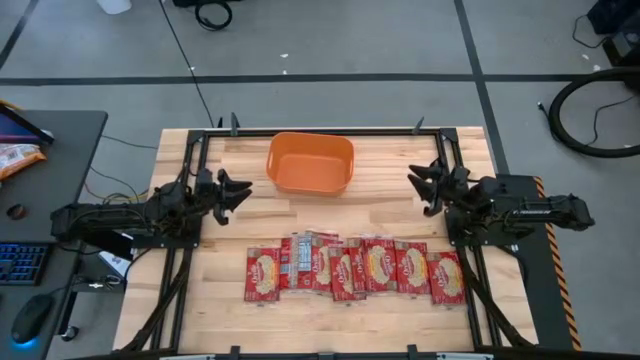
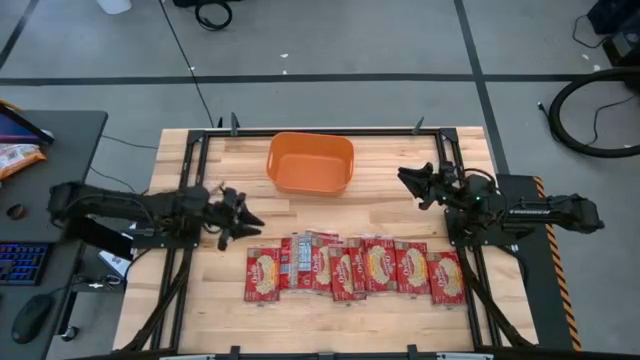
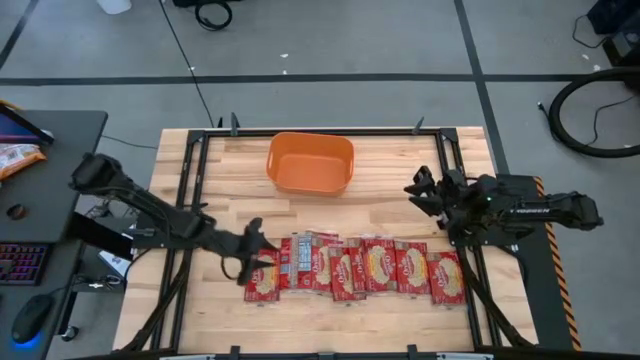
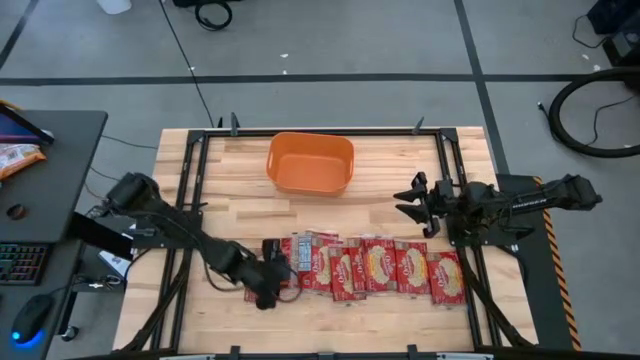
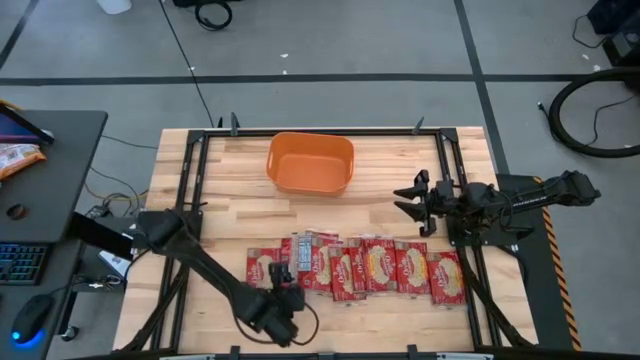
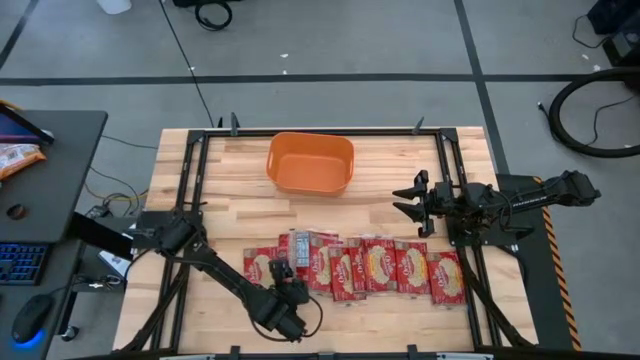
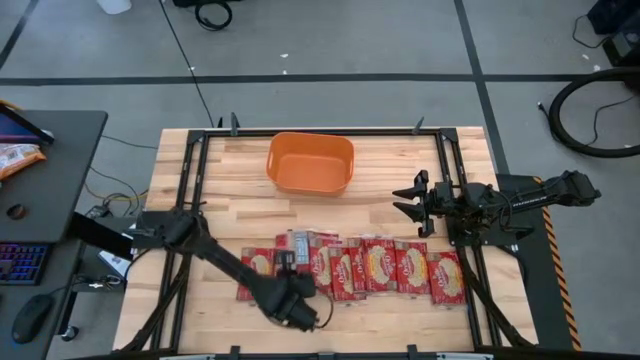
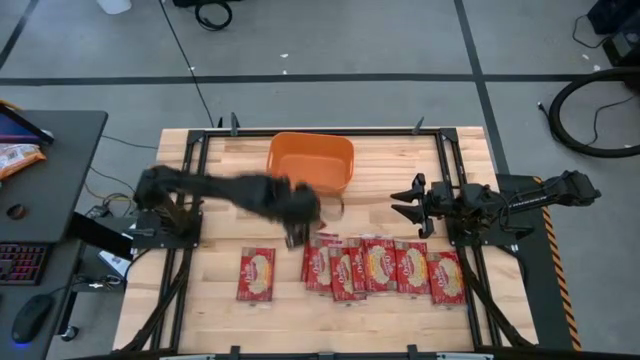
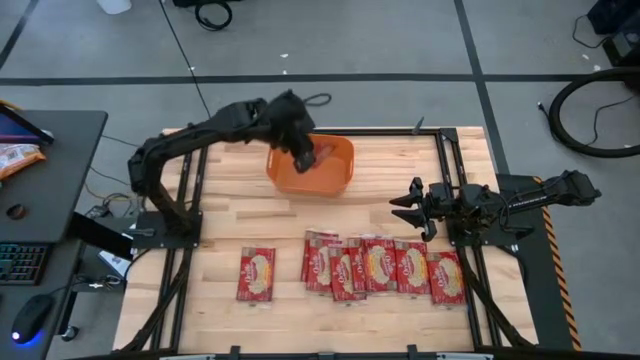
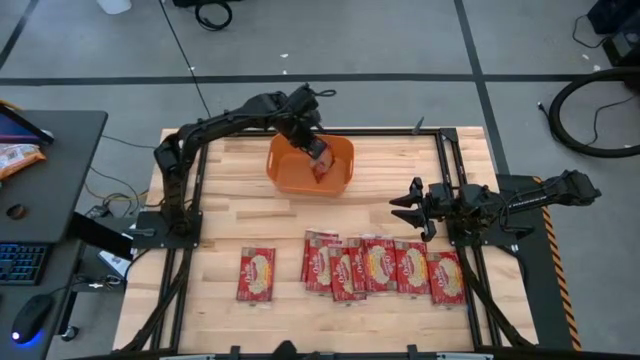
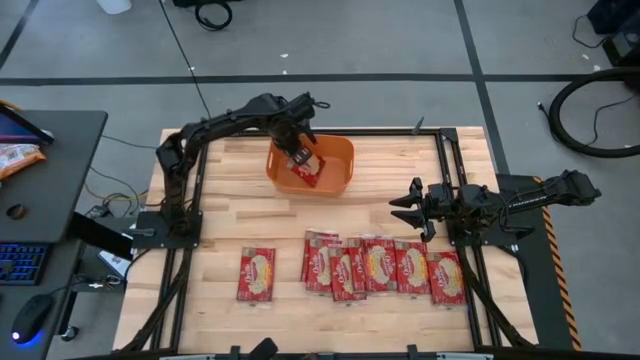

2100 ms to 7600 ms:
Task: Sort popcorn bags into baskets
Put the red popcorn bag into the orange bin

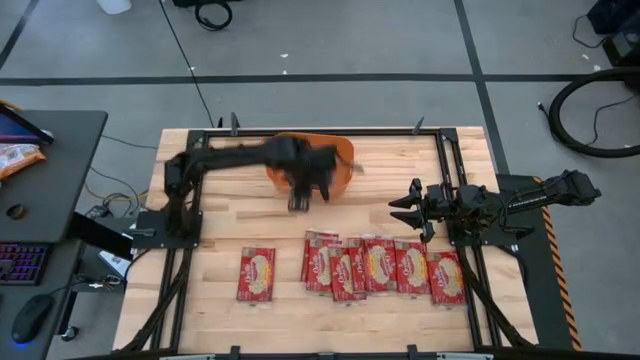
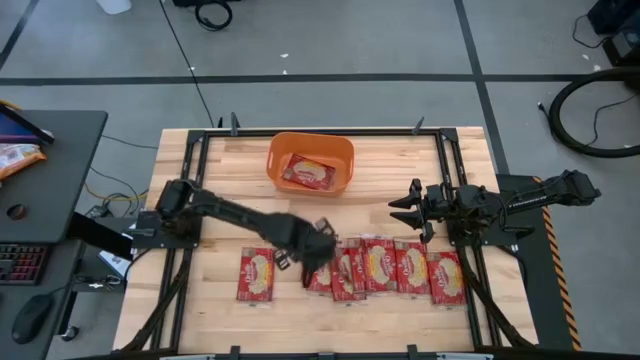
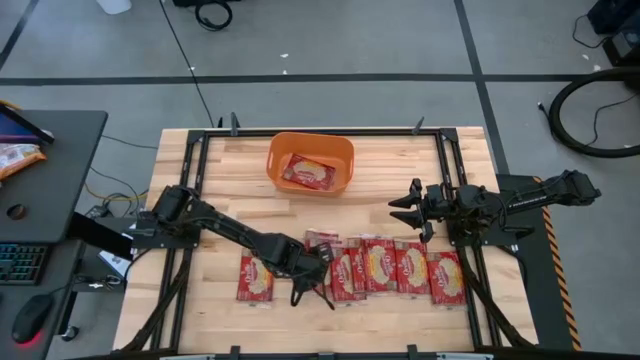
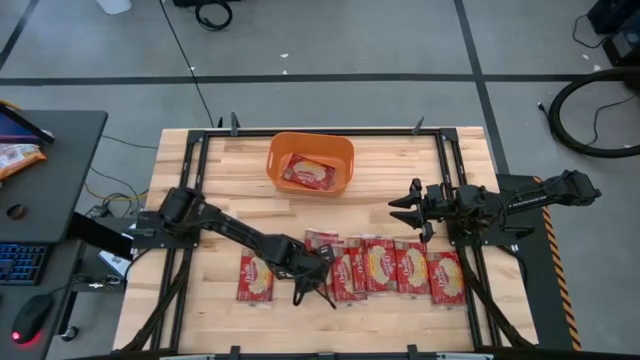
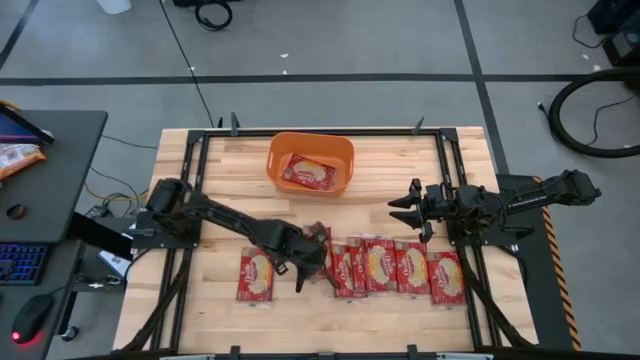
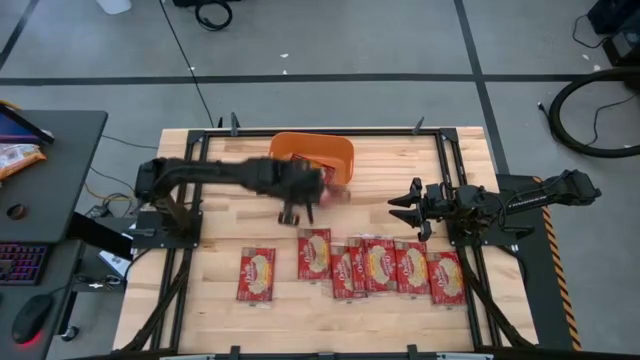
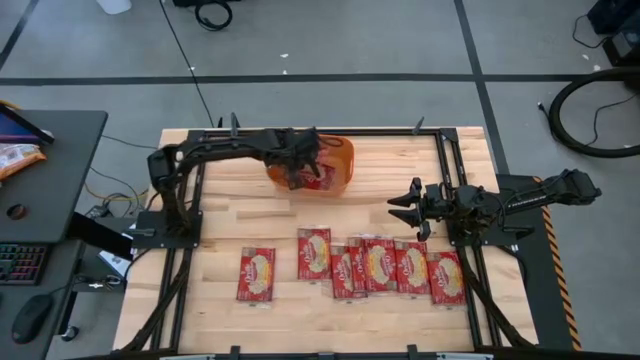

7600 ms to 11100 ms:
Put the red popcorn bag into the orange bin

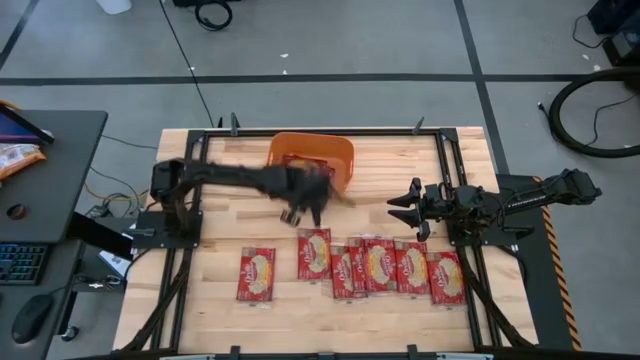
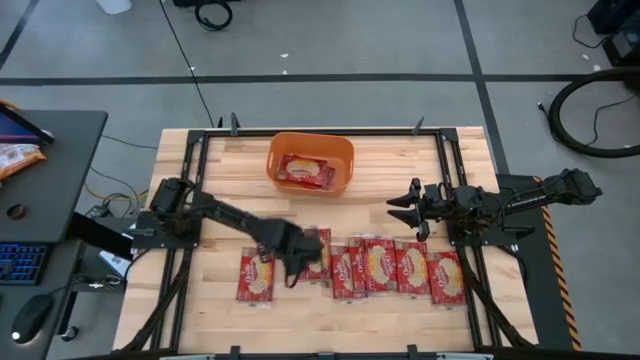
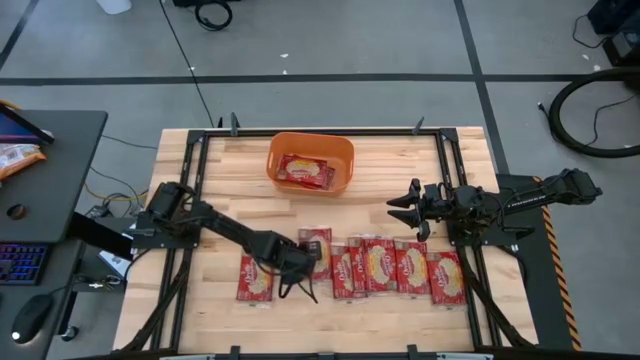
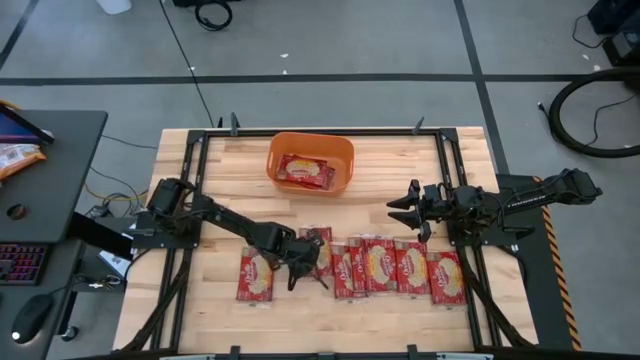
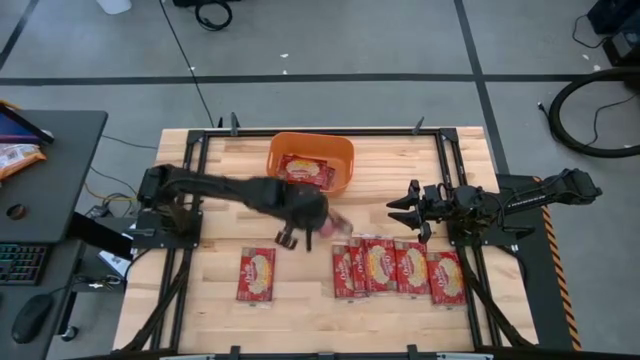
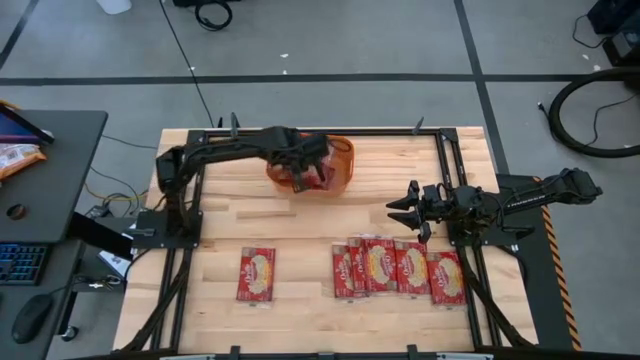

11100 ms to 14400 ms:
Put the red popcorn bag into the orange bin

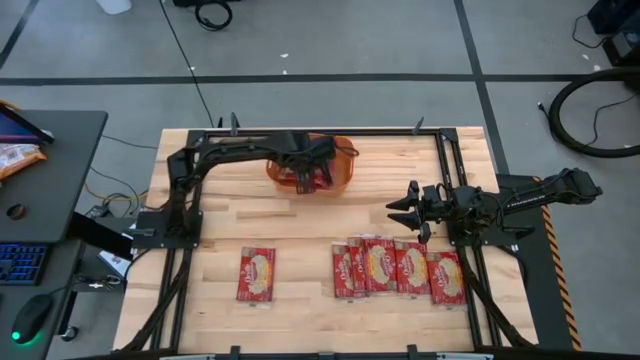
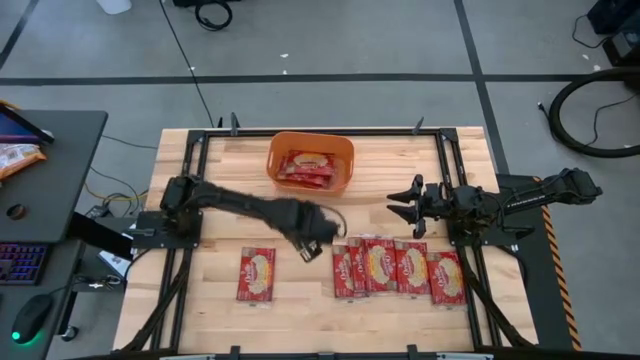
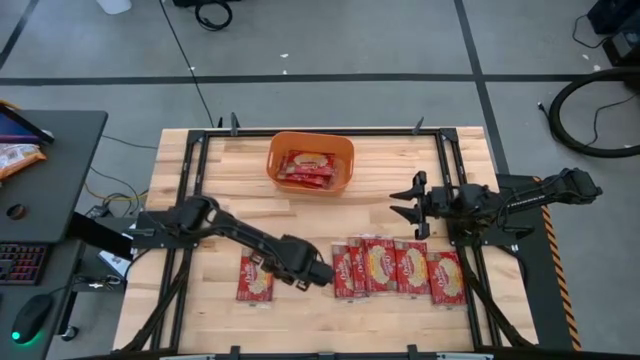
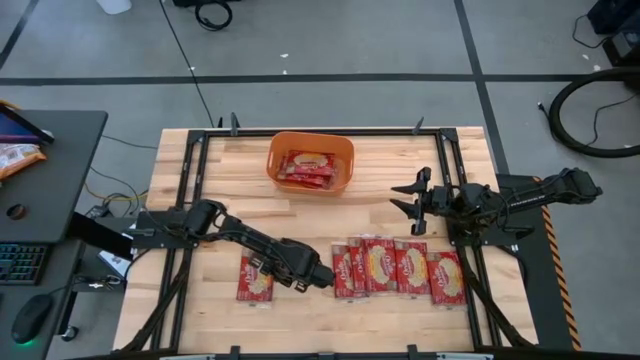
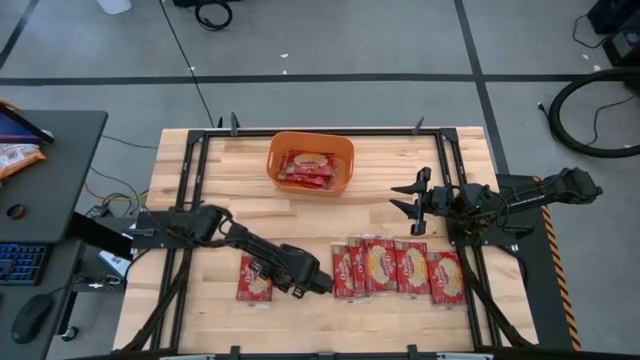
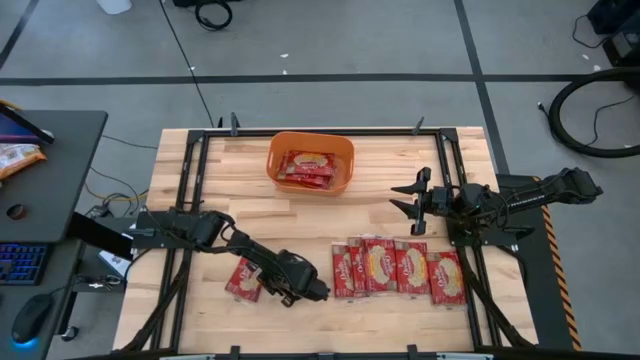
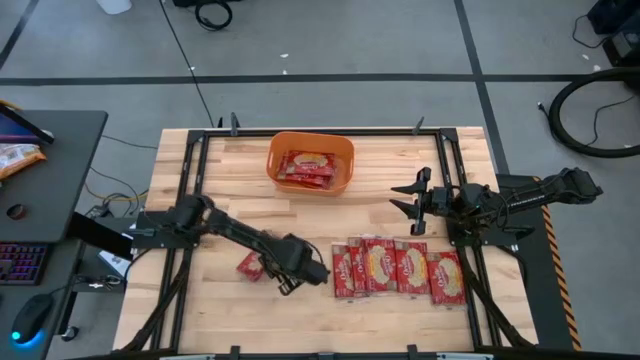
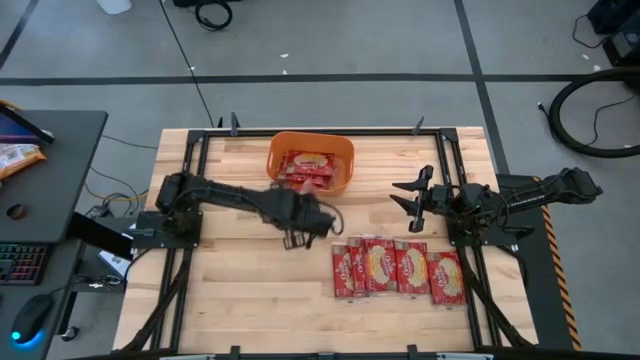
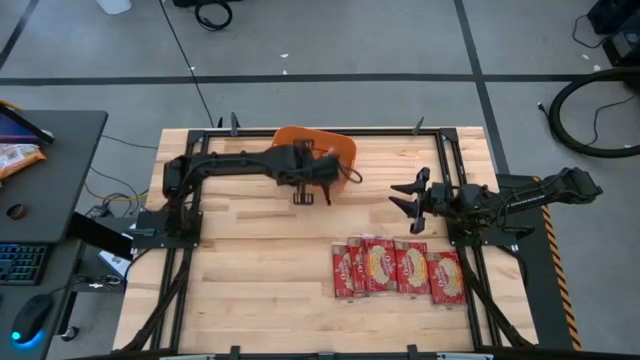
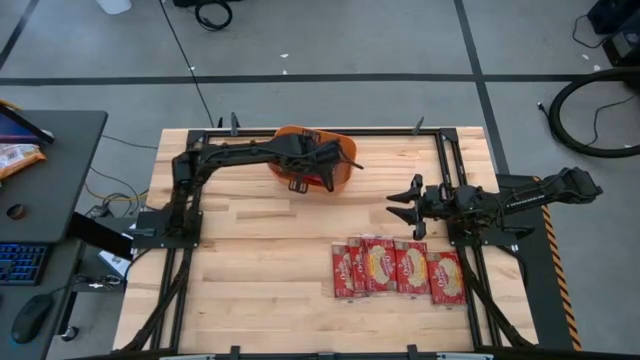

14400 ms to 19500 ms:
Put the red popcorn bag into the orange bin

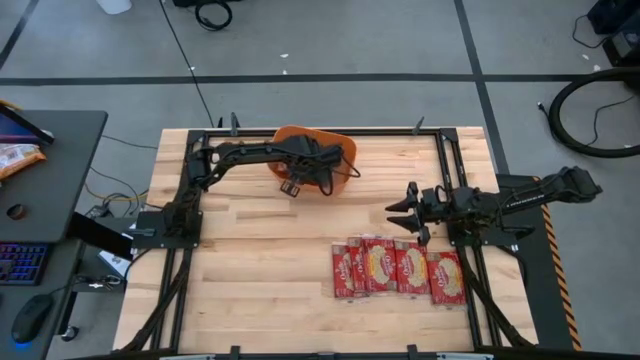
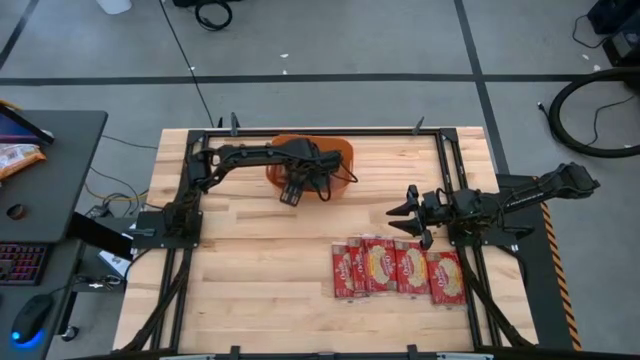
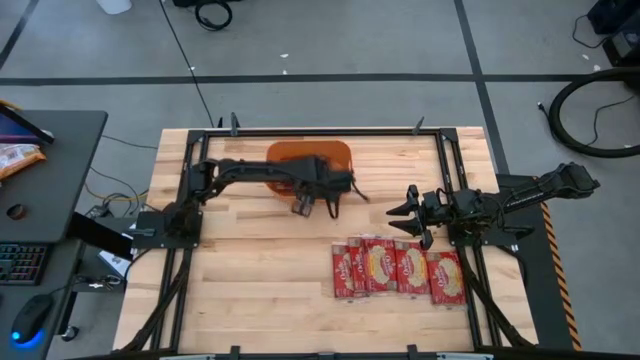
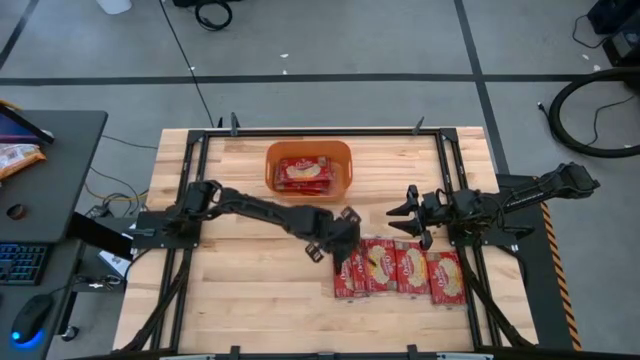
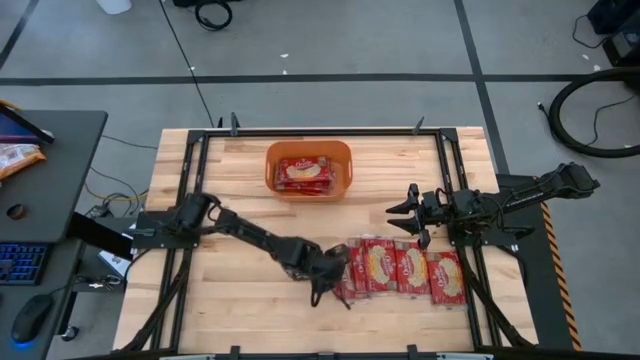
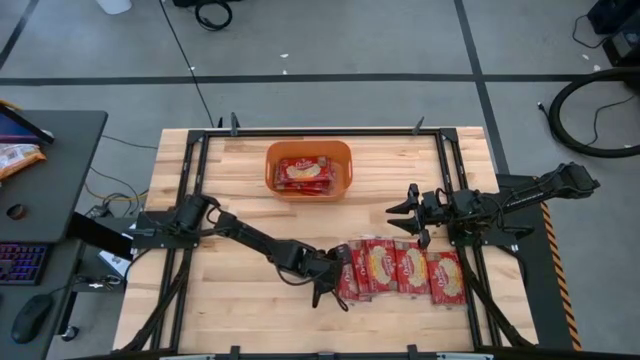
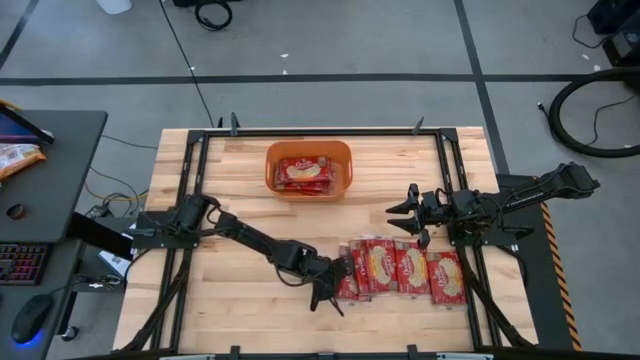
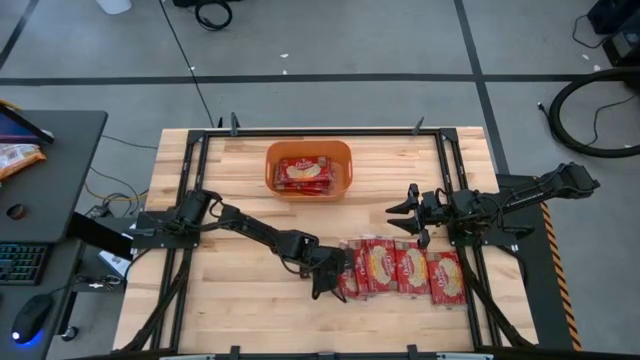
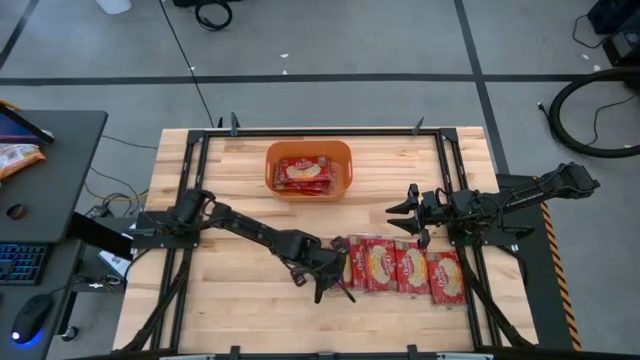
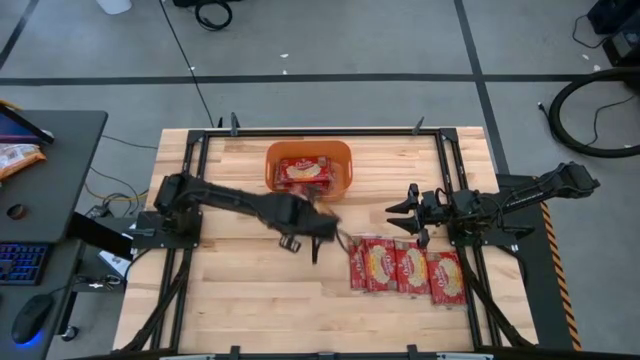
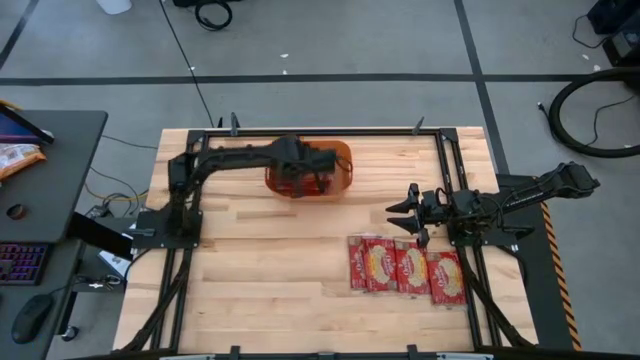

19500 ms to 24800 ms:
Put the red popcorn bag into the orange bin
